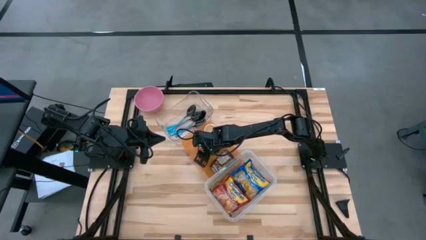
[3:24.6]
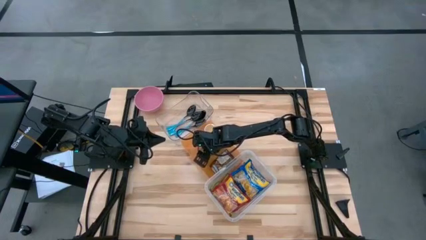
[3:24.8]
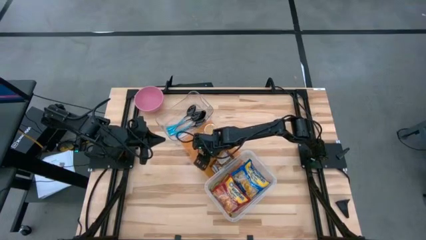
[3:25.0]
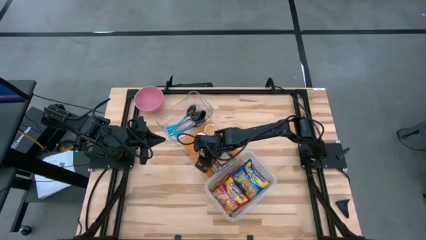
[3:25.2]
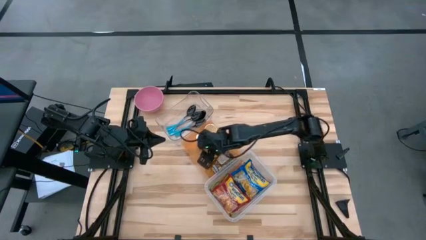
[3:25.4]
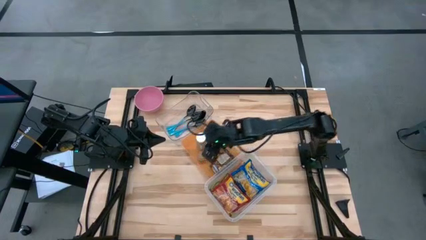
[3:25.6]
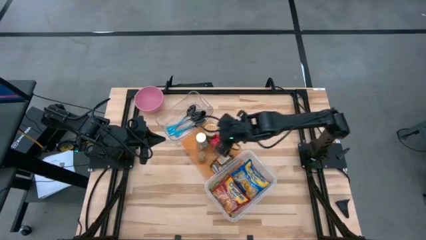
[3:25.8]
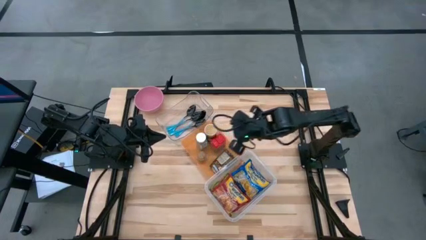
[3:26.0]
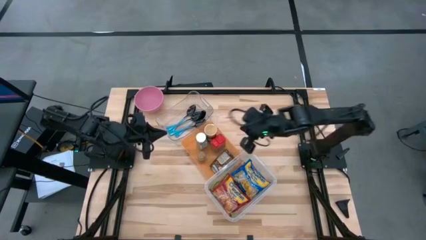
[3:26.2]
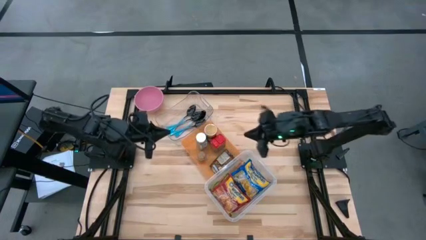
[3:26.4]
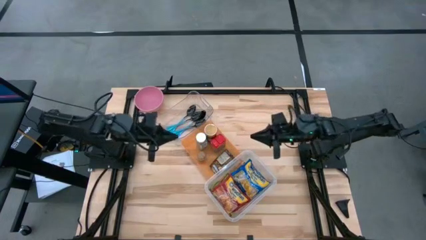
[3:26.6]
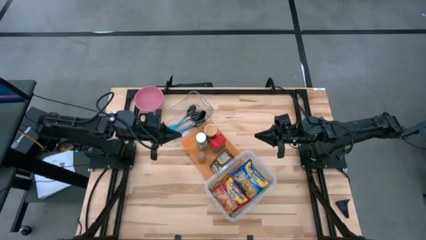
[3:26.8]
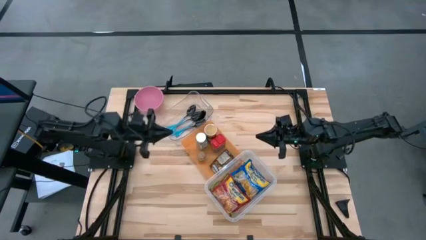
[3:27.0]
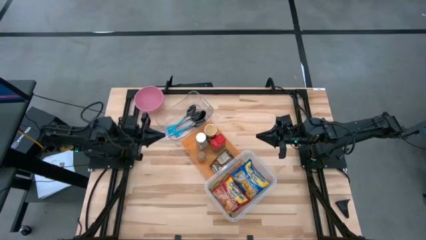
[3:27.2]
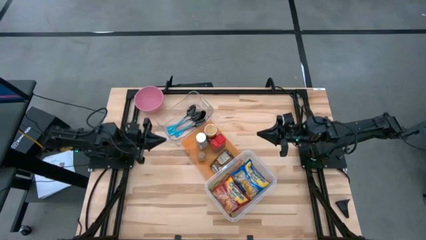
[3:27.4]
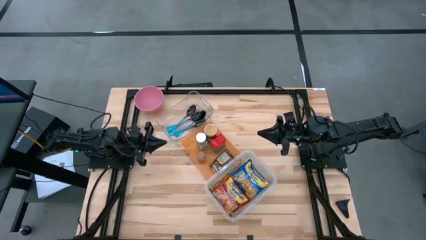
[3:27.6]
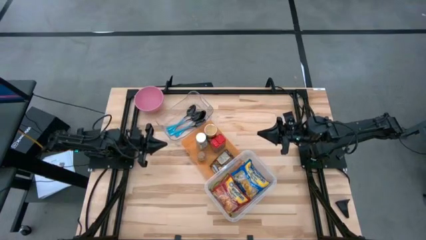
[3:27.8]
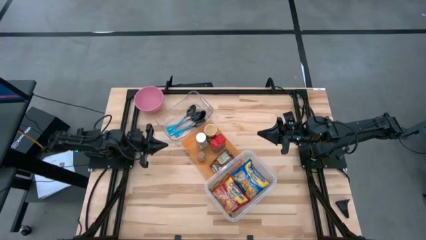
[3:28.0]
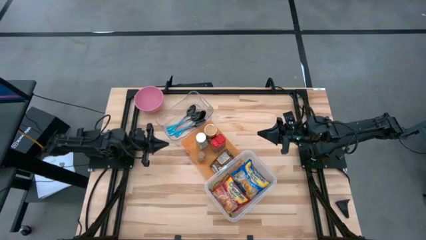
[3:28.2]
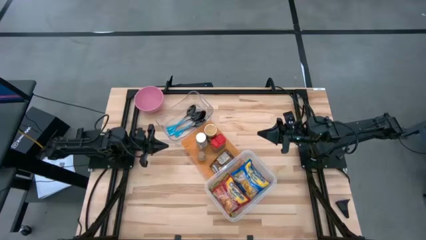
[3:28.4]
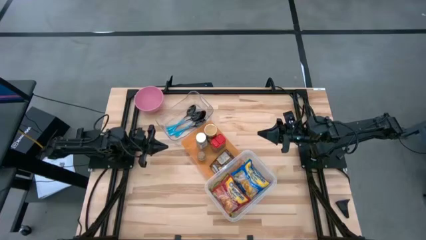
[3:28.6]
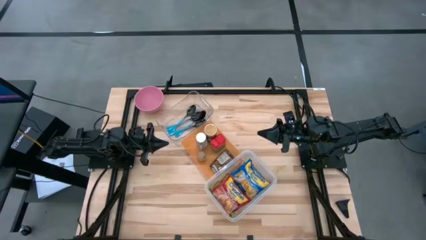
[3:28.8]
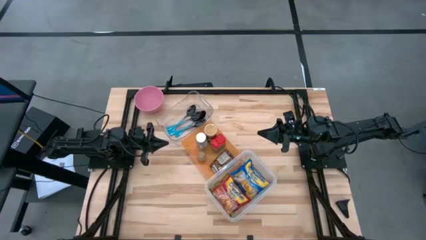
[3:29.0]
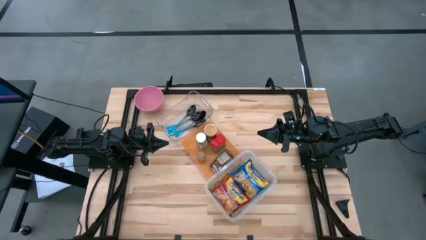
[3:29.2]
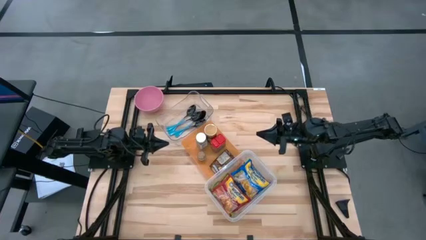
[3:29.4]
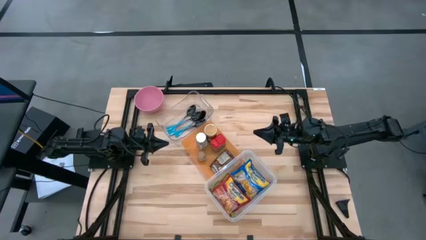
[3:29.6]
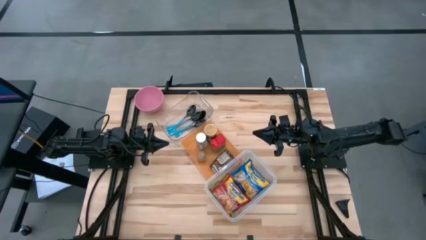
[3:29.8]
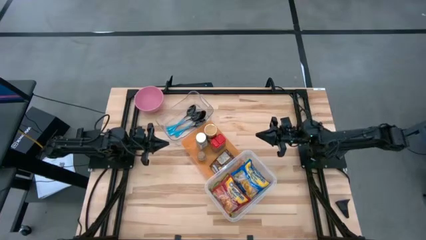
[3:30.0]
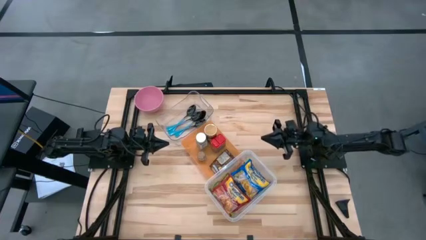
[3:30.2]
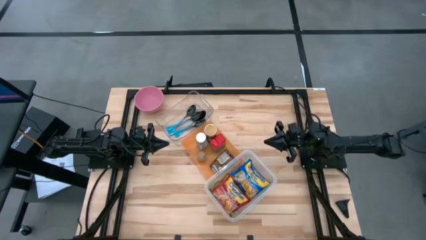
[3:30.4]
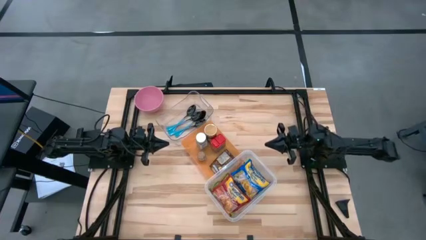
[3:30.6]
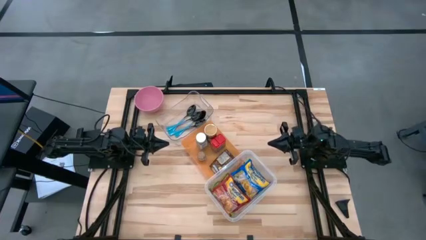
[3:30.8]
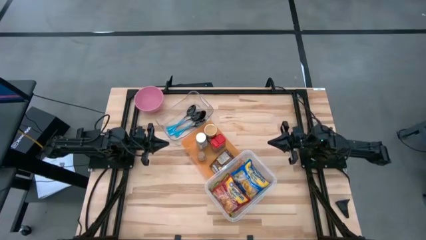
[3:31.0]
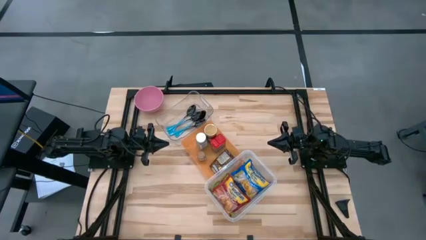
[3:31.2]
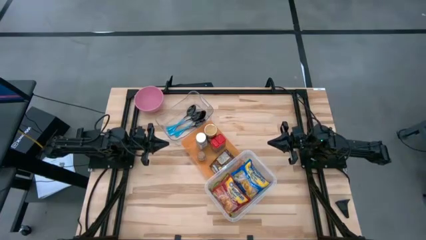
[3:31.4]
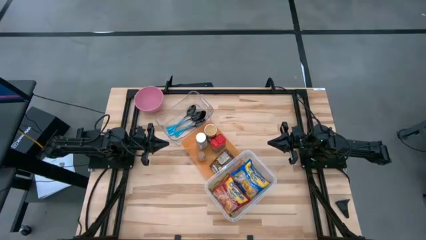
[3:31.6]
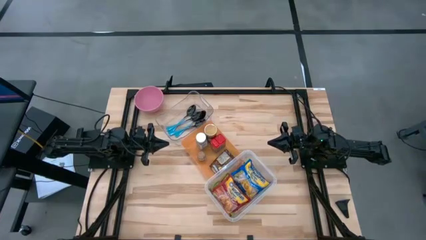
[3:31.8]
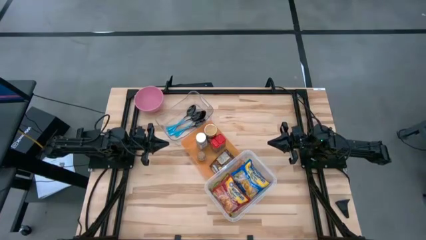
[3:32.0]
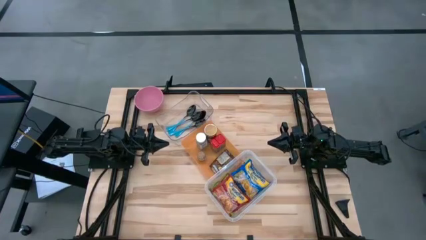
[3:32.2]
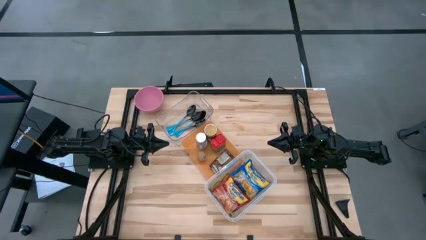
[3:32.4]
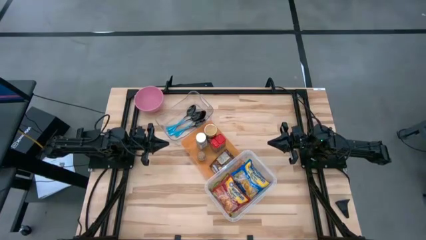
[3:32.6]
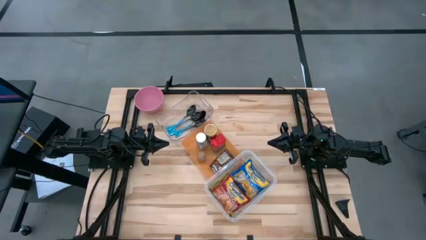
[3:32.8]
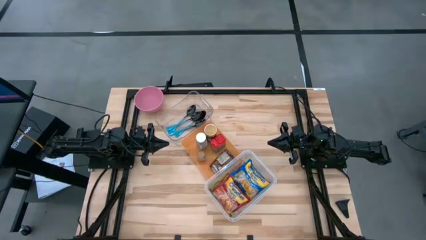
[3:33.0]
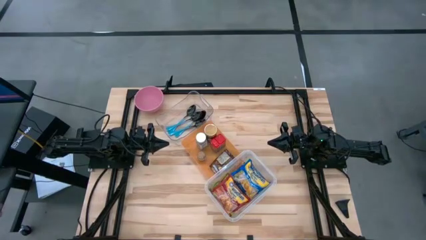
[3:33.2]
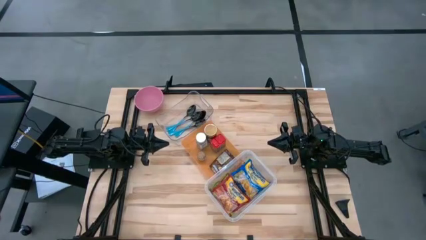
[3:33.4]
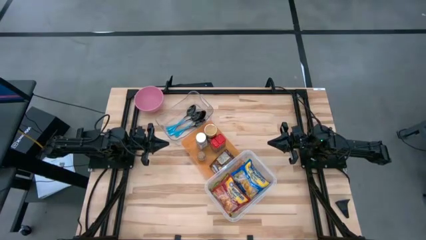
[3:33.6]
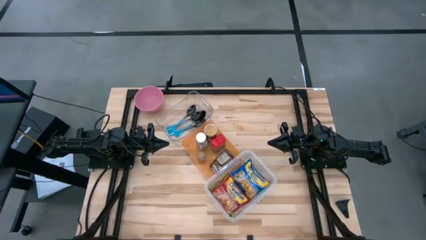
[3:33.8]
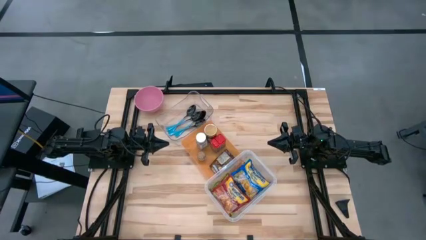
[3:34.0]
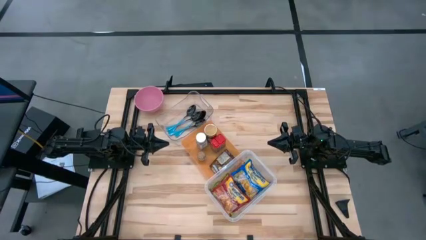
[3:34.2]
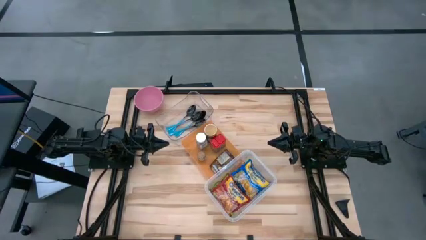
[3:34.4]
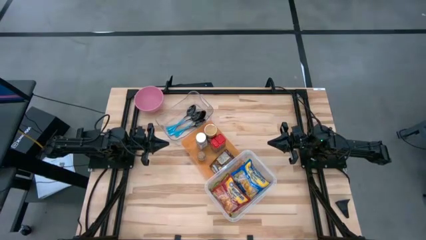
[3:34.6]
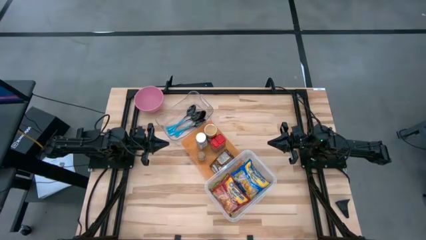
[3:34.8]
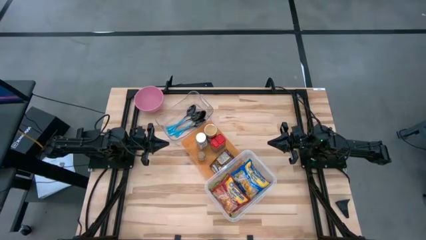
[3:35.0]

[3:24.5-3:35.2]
Task: Pick & Place Food Item
Return to Home Position
